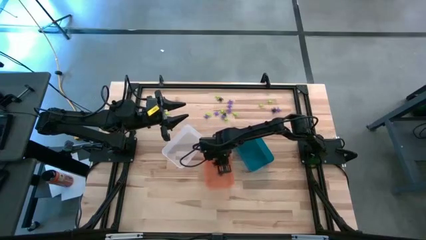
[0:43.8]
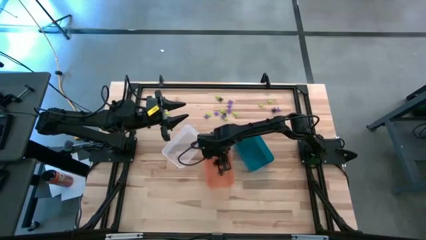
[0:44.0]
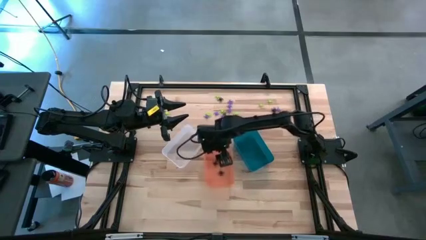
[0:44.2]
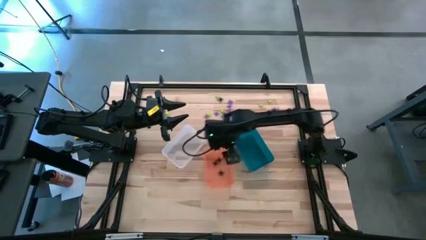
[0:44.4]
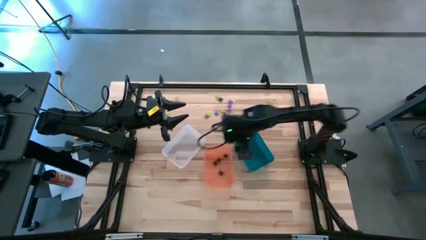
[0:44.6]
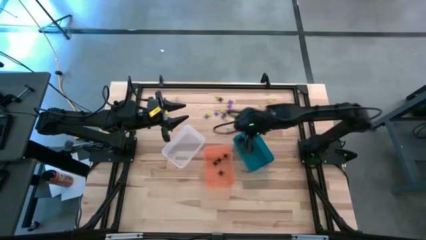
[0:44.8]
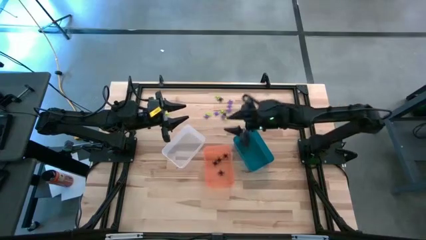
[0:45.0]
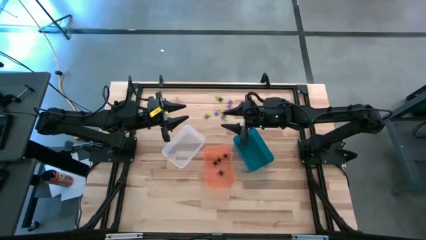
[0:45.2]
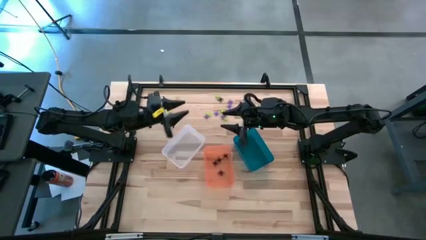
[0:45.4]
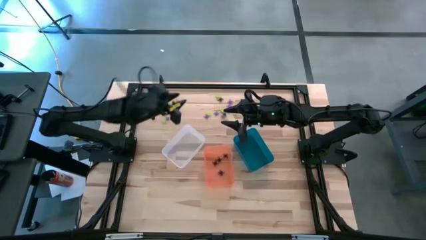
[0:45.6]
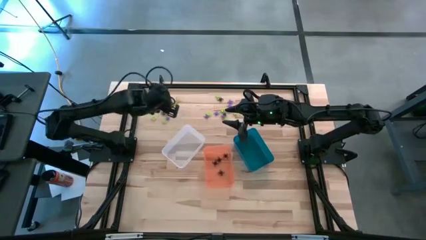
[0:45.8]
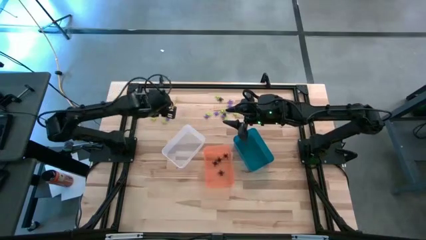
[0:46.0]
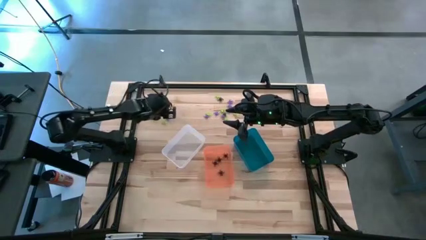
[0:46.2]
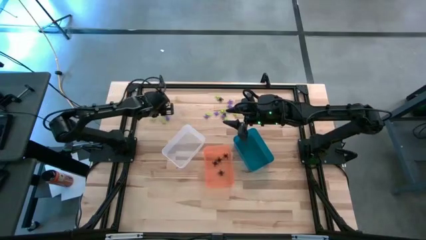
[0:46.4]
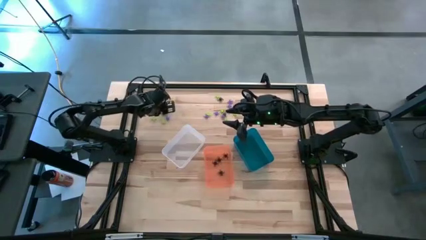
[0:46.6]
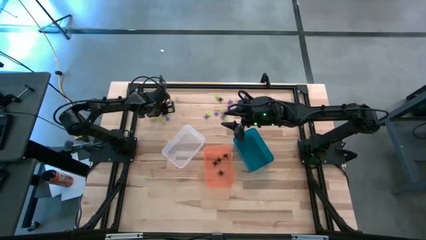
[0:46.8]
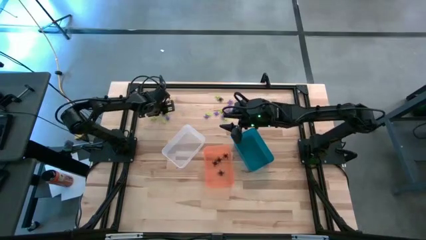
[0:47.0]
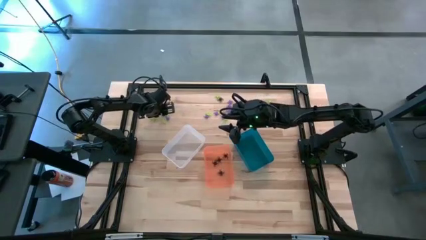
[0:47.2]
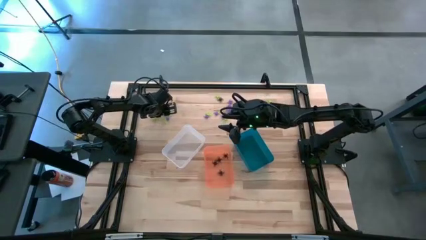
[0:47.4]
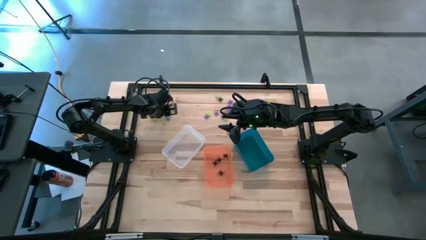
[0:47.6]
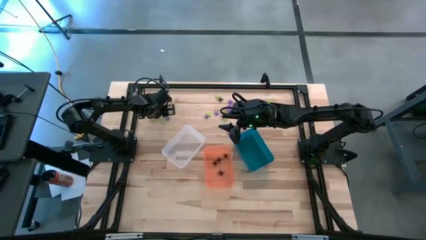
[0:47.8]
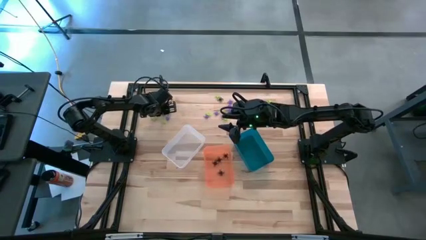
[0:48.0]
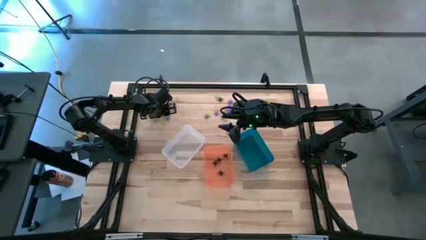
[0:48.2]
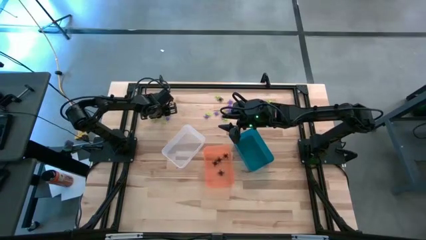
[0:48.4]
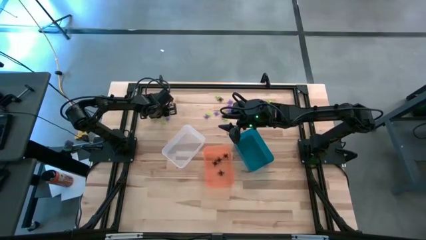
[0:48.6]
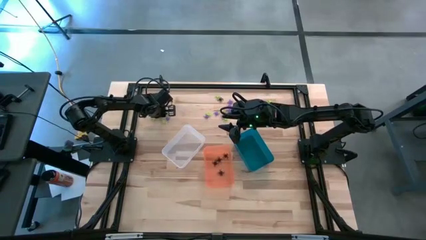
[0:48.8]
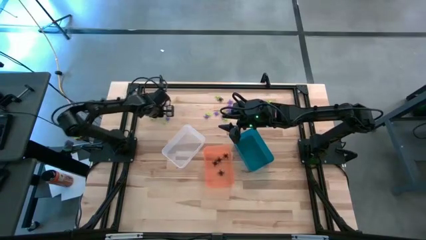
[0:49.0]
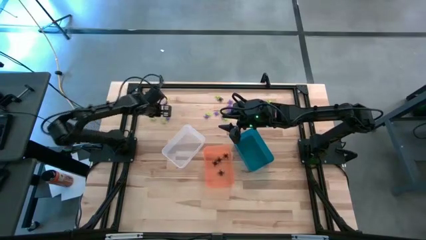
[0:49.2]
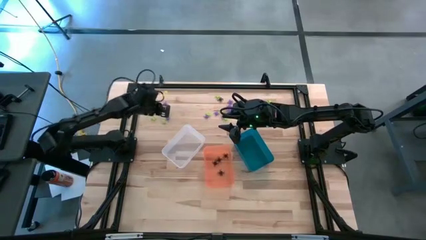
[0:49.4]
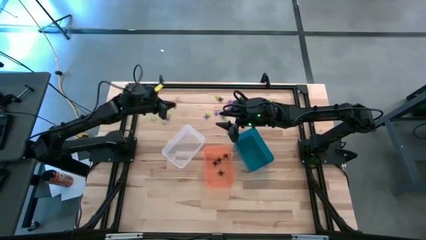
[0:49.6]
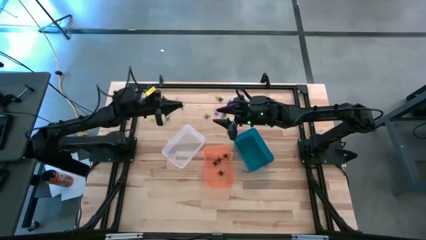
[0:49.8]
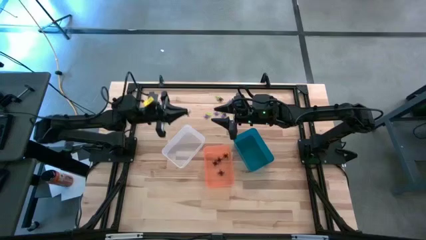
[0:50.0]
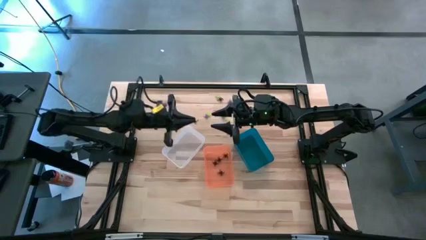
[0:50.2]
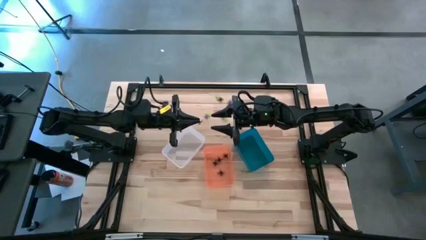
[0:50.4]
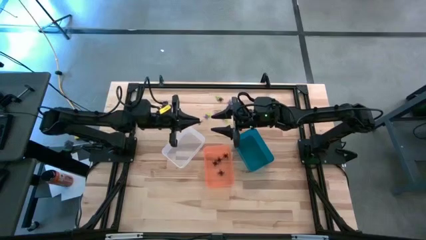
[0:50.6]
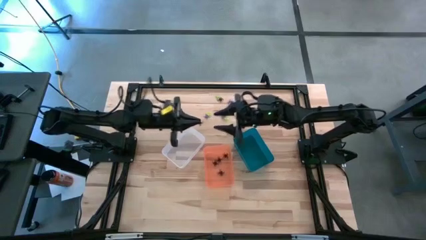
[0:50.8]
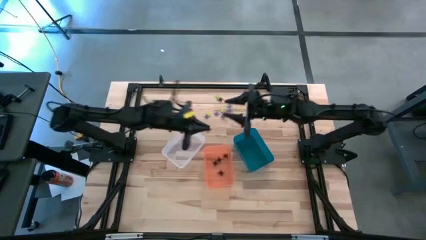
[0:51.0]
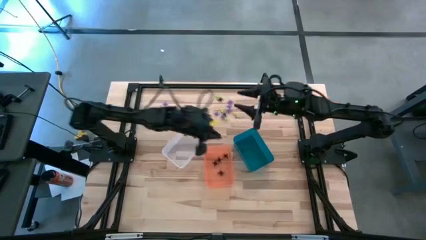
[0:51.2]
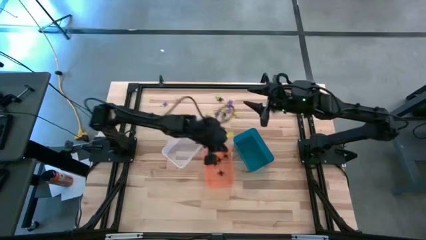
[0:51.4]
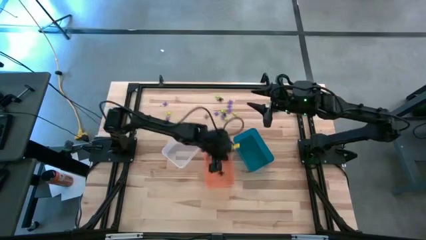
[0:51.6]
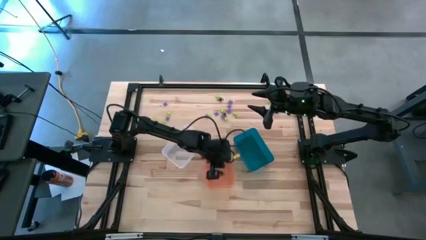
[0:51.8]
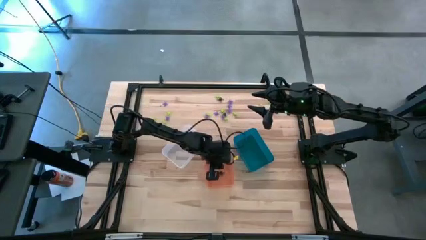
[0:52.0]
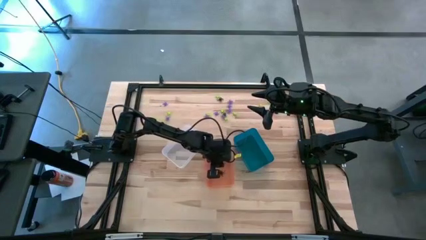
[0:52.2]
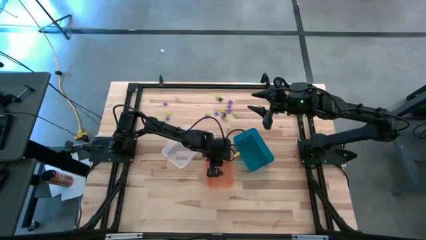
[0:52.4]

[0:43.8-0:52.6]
Task: Sort Halloween decoration
Put the black spider toy into the orange bin

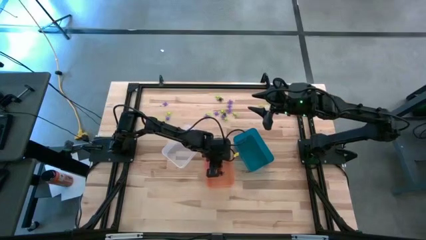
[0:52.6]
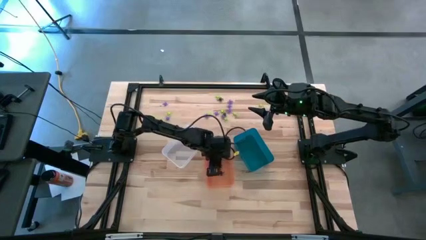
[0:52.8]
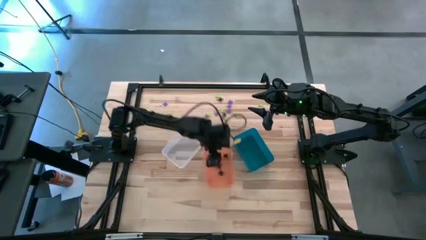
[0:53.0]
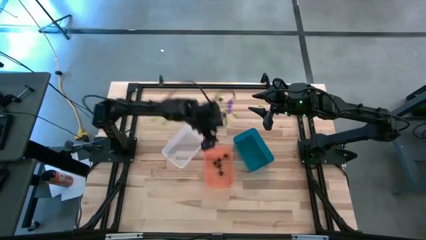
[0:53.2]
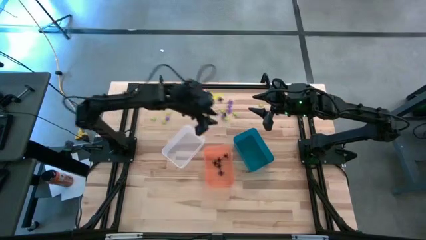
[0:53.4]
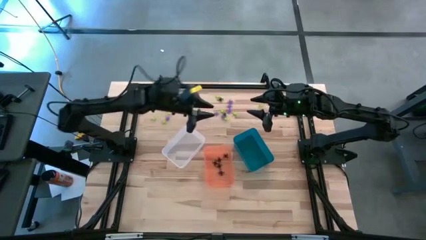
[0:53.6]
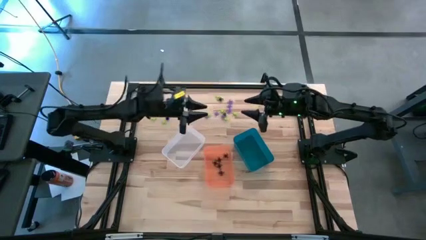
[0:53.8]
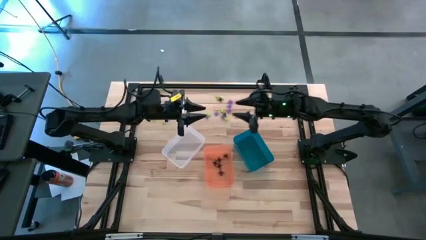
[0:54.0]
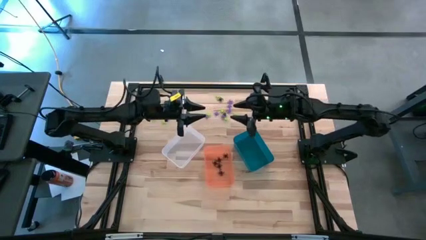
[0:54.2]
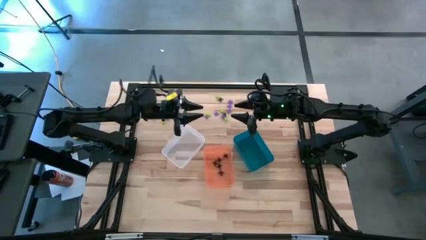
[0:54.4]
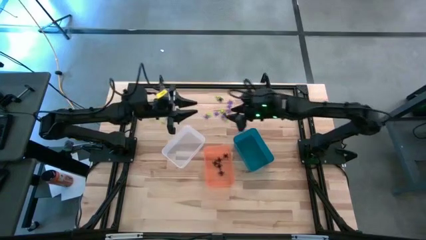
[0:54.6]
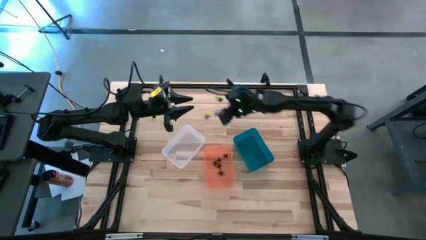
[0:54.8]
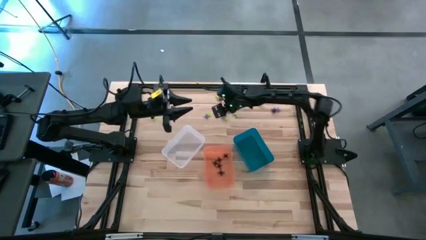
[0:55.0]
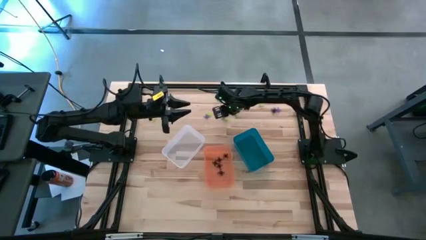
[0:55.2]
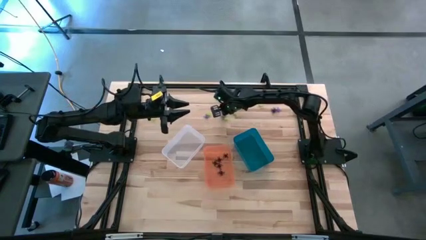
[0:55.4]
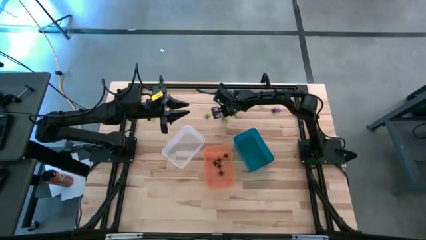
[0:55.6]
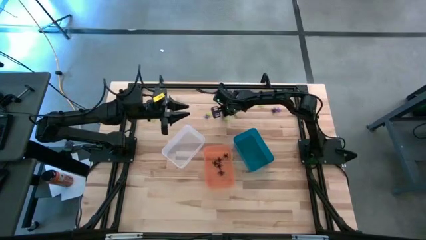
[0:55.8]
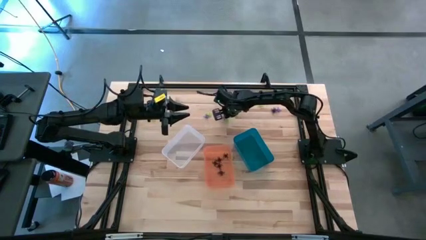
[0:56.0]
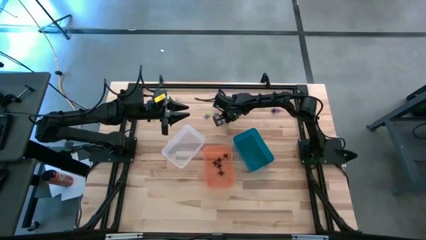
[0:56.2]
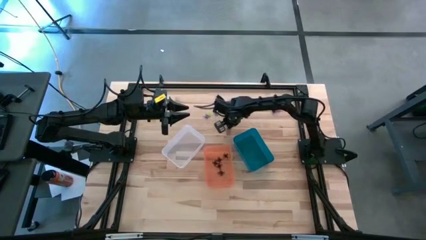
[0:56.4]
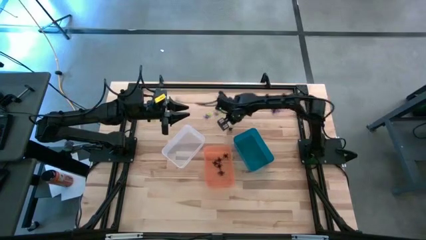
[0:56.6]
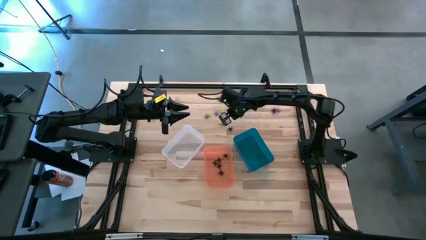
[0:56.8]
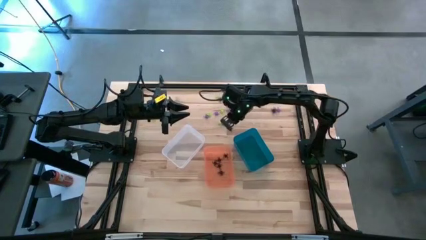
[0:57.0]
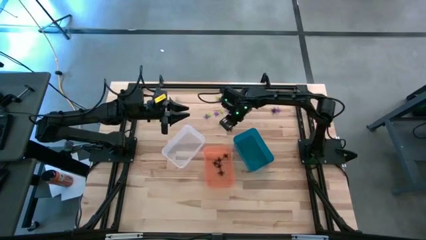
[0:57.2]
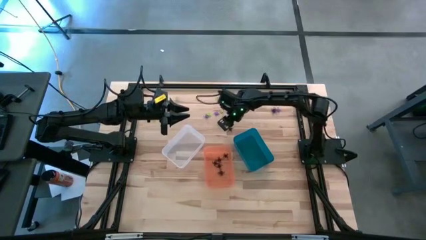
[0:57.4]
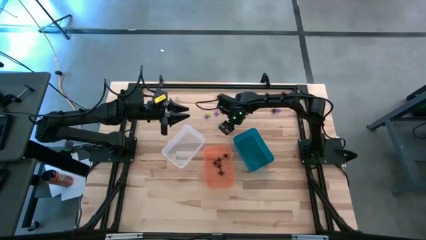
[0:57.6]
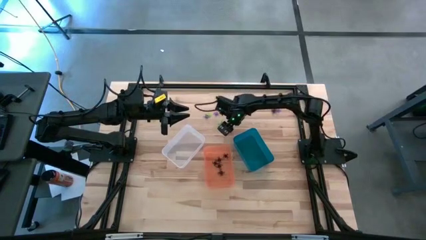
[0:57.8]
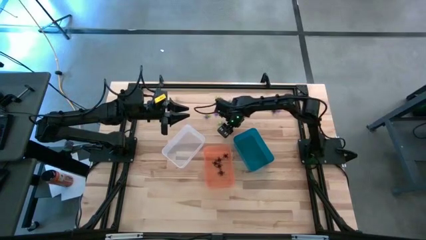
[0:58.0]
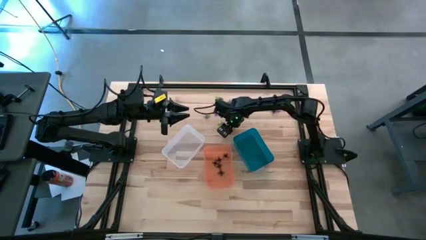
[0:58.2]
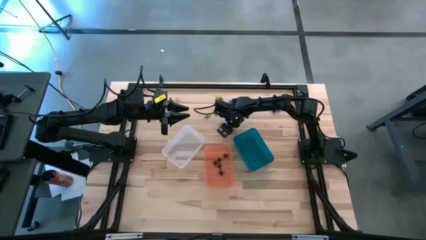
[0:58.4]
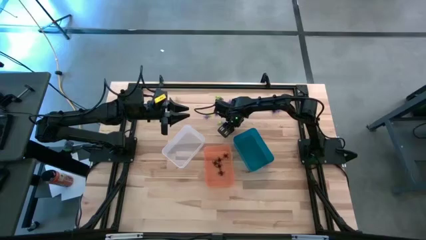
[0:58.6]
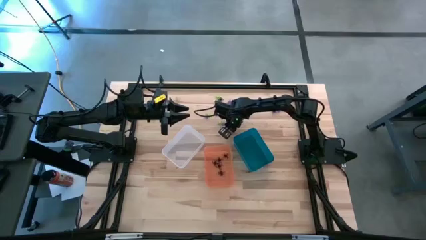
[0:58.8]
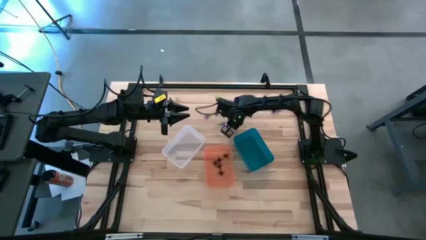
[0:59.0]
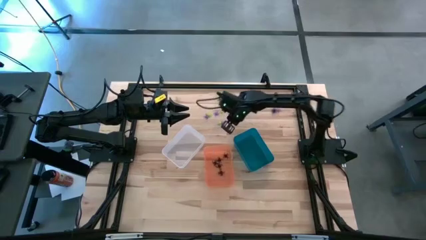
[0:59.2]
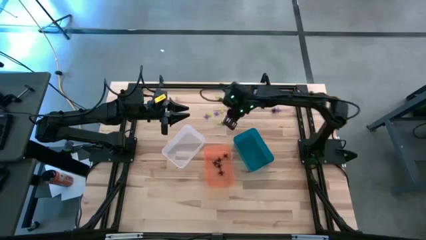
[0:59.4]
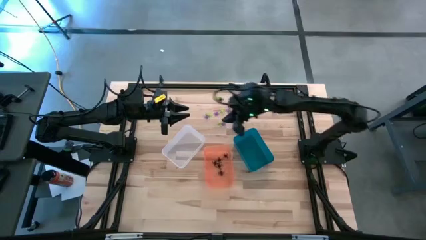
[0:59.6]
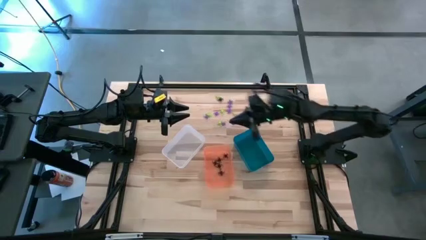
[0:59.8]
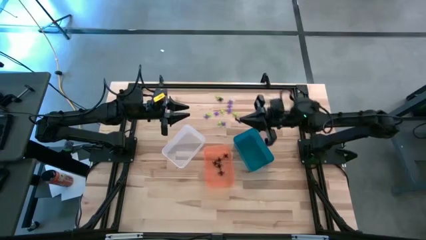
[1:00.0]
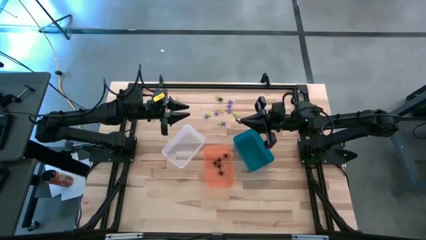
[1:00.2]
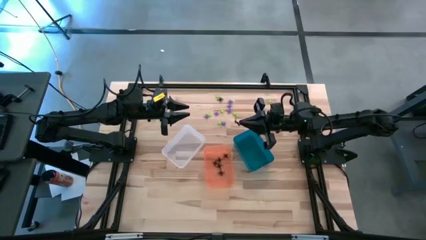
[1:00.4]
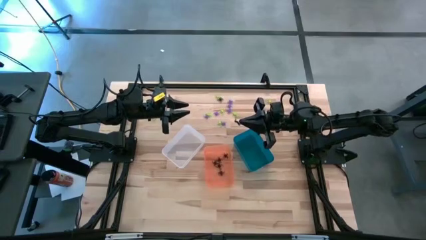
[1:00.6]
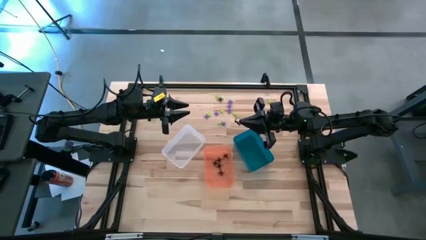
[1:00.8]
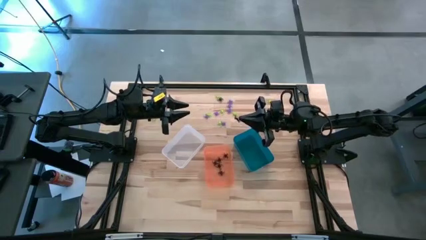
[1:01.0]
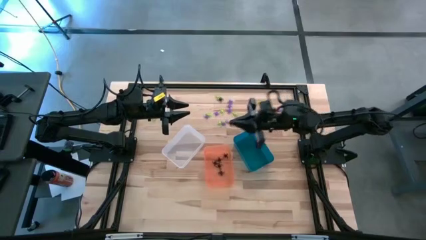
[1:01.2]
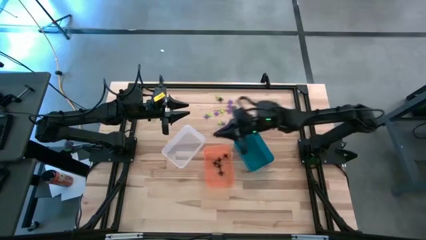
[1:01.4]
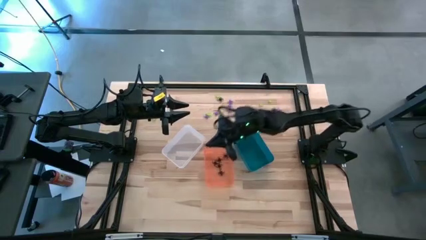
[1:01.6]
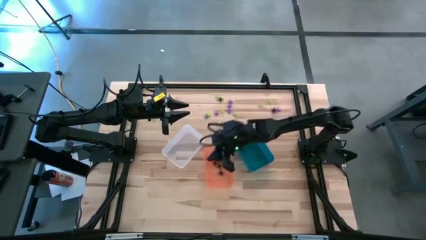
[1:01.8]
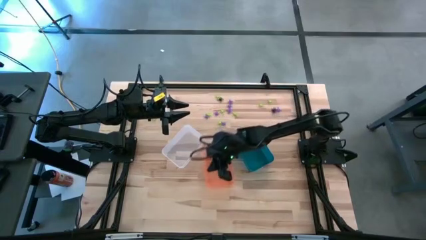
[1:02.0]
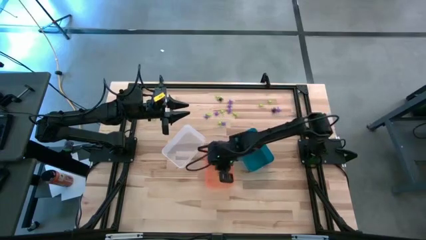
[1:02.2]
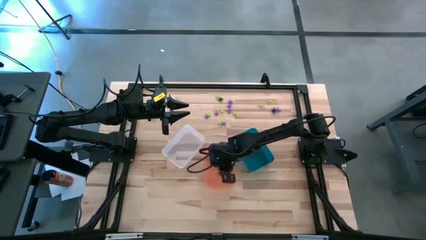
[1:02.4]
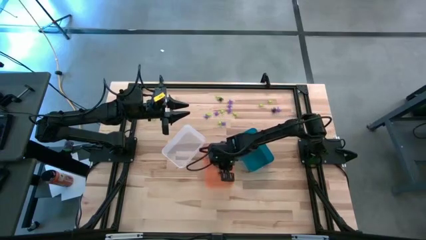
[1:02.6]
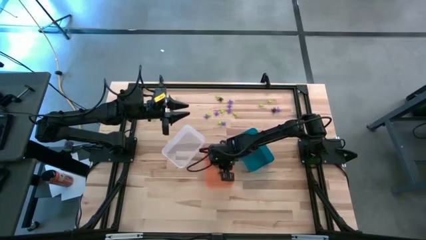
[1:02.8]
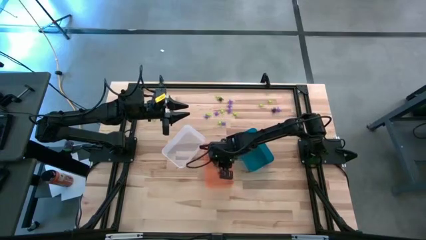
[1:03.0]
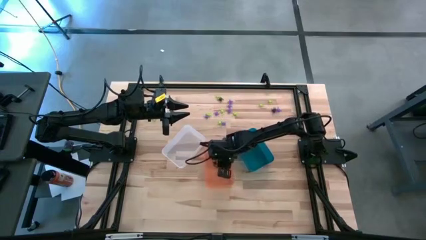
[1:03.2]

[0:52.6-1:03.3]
Put the black spider toy into the orange bin
